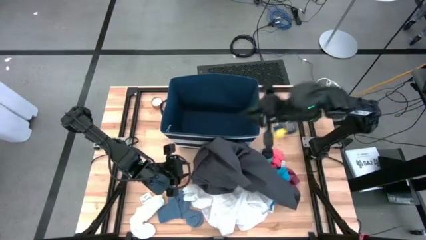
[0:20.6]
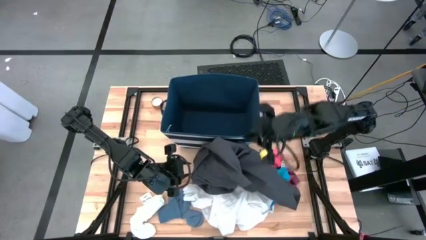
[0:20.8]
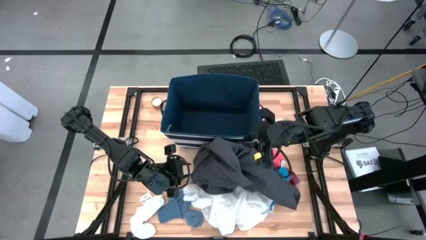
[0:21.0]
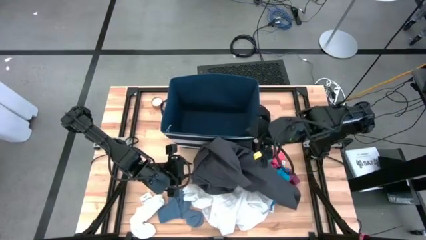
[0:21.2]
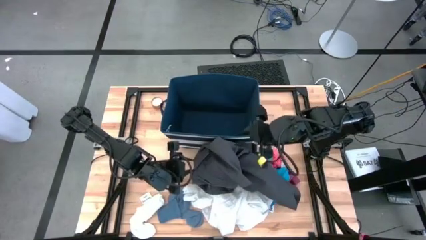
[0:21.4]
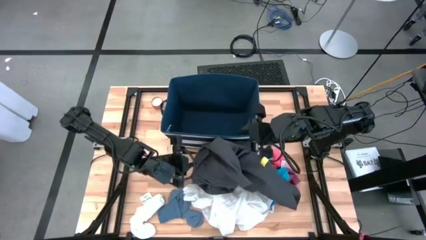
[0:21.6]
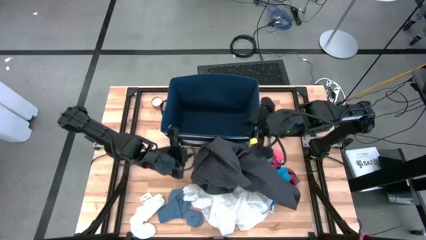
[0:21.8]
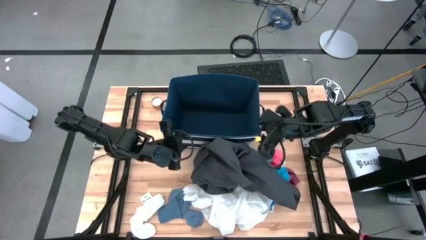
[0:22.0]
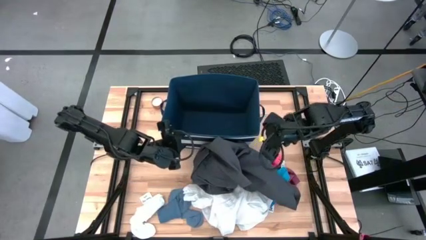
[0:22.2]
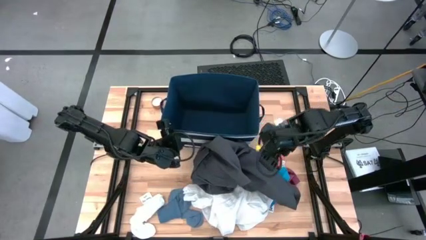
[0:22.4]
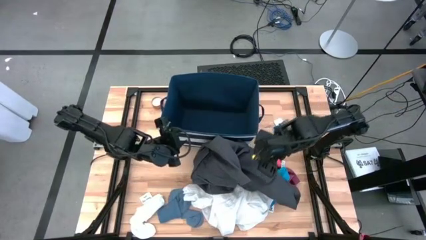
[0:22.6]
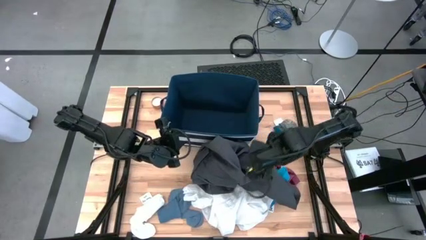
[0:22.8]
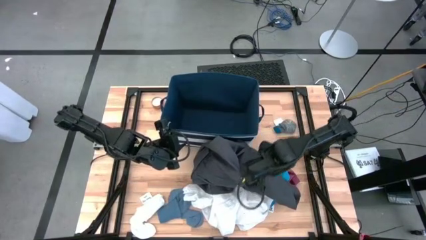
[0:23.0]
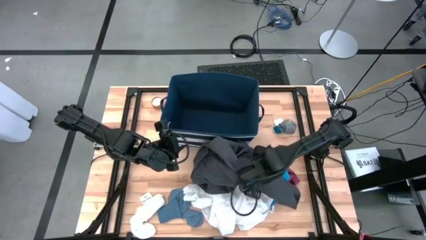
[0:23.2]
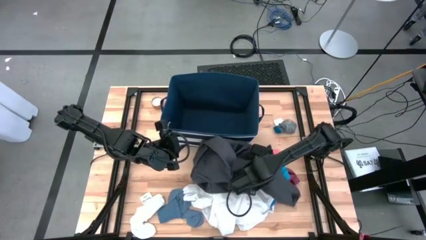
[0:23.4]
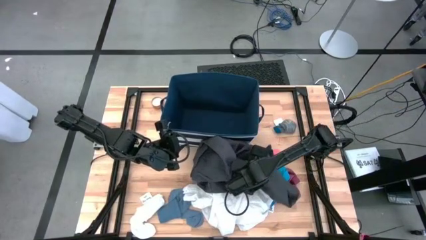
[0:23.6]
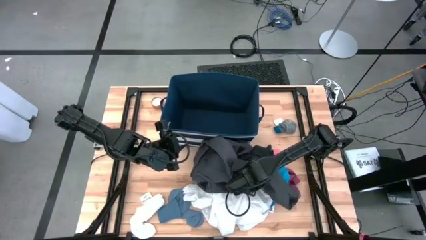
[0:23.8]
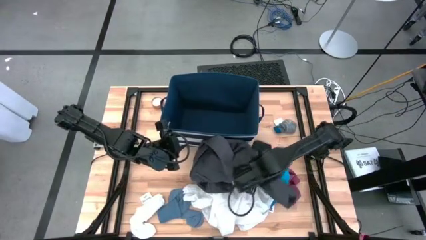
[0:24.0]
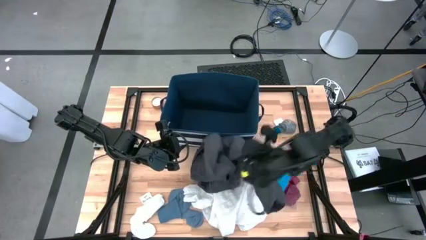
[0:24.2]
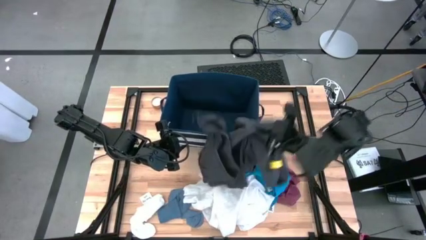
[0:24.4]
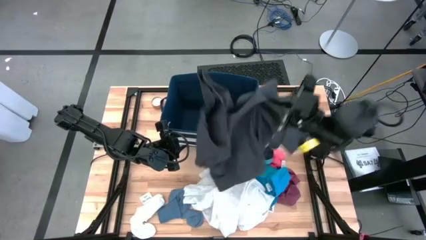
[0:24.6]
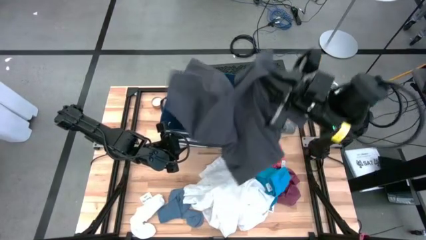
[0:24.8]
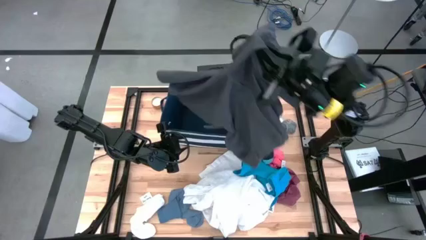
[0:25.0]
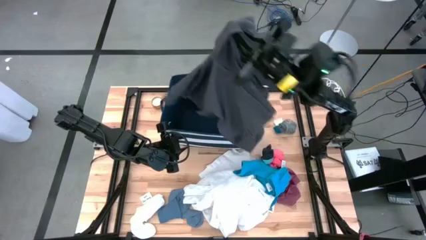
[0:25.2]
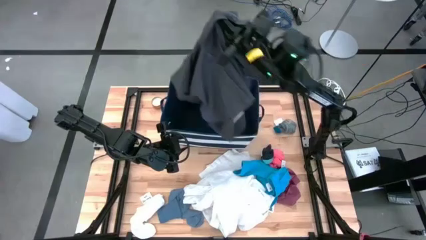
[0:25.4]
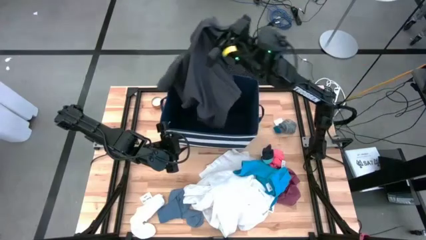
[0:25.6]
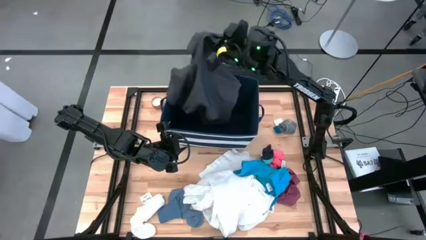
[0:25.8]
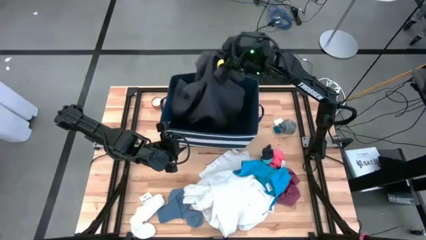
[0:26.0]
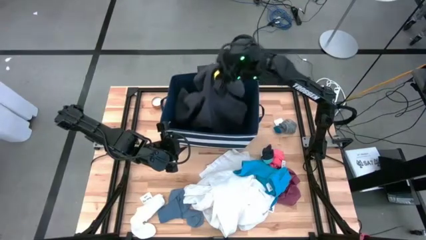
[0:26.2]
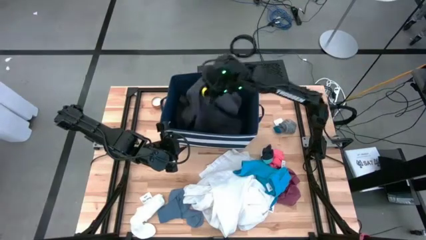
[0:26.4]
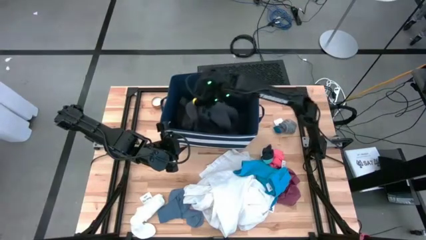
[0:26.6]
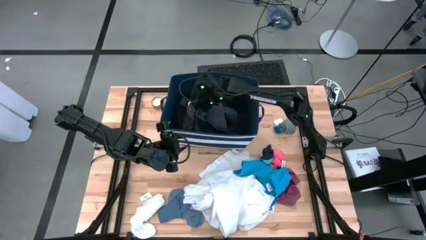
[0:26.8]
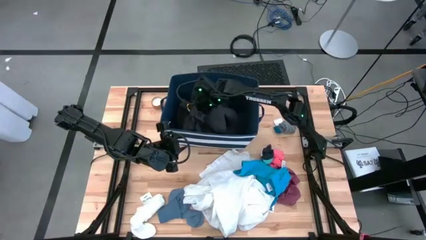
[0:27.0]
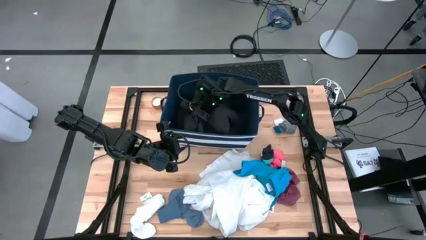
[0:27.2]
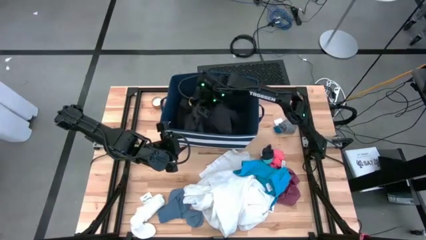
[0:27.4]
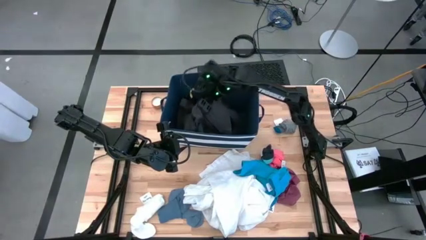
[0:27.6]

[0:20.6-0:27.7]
Task: Sort clothes
Put the gray short into the white and blue laundry organizer

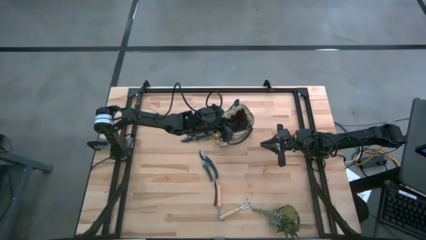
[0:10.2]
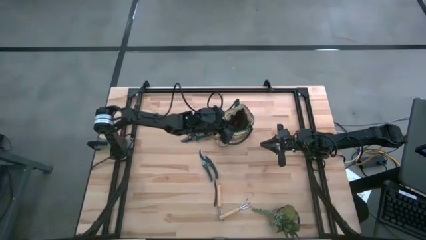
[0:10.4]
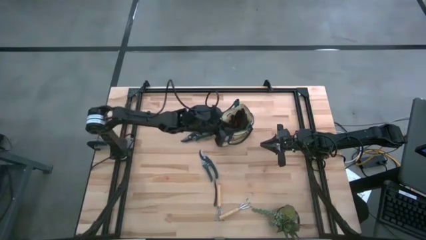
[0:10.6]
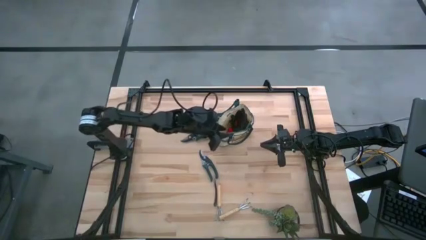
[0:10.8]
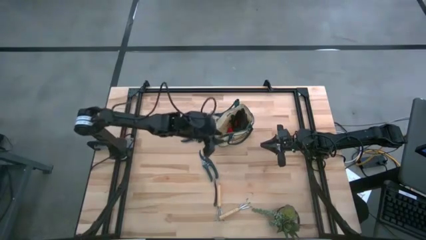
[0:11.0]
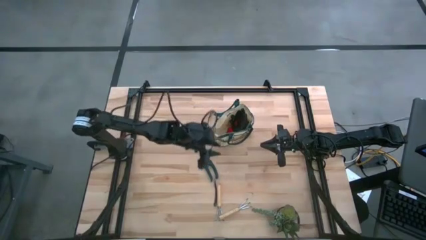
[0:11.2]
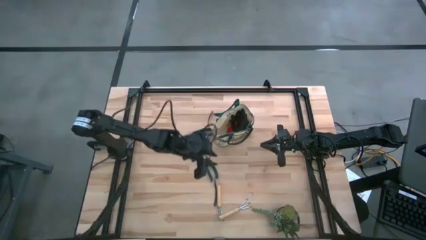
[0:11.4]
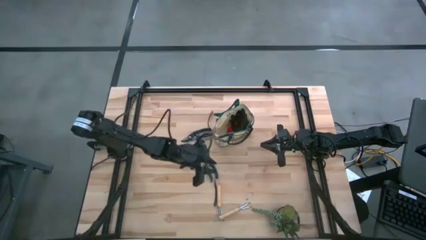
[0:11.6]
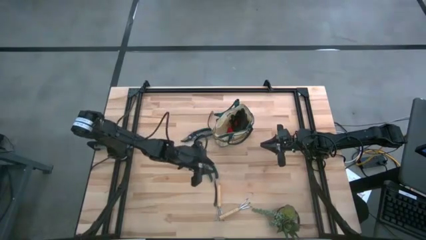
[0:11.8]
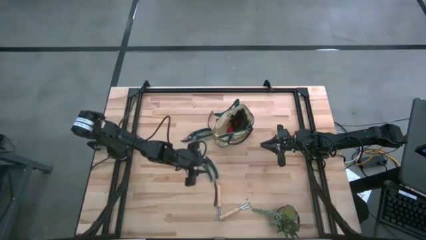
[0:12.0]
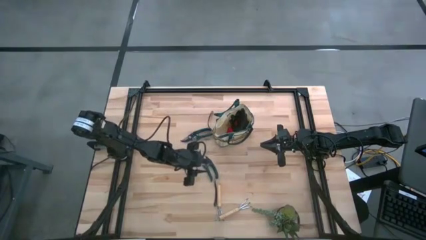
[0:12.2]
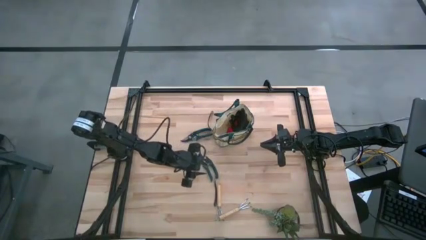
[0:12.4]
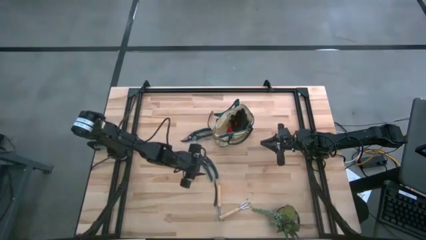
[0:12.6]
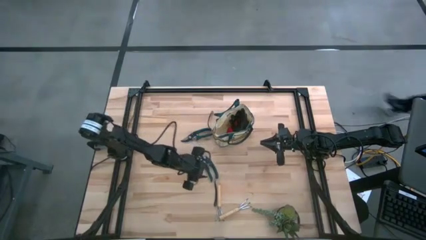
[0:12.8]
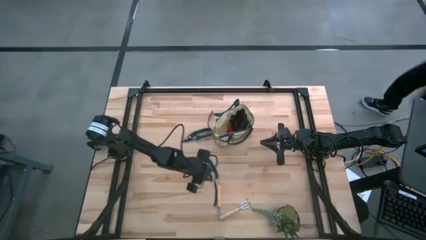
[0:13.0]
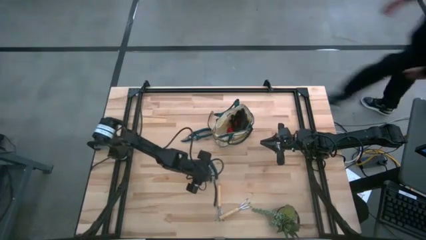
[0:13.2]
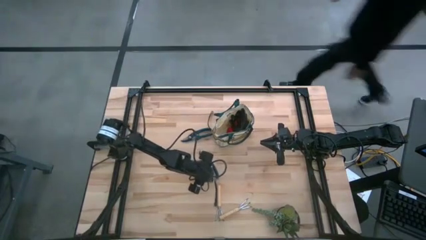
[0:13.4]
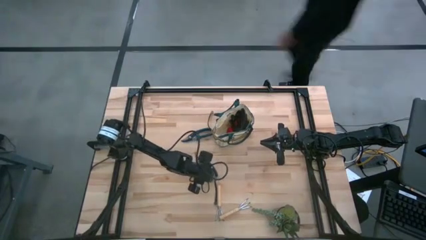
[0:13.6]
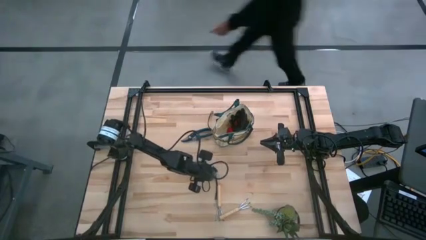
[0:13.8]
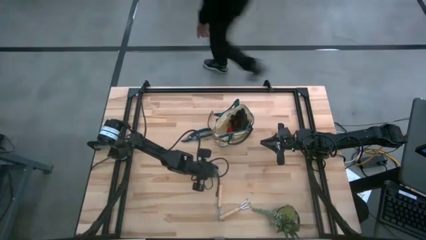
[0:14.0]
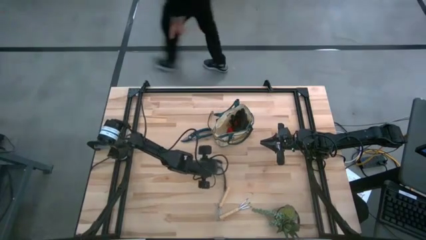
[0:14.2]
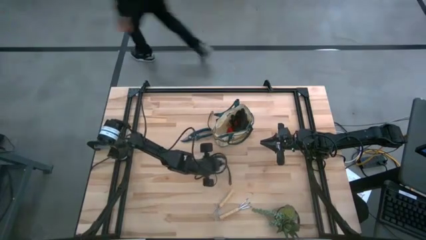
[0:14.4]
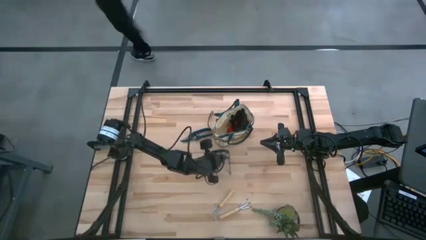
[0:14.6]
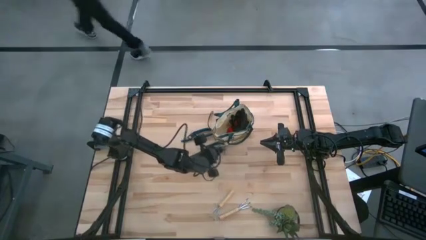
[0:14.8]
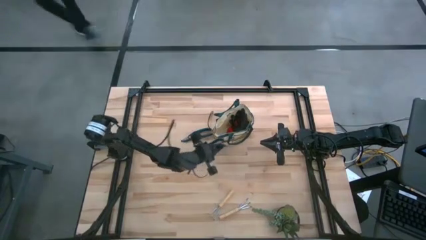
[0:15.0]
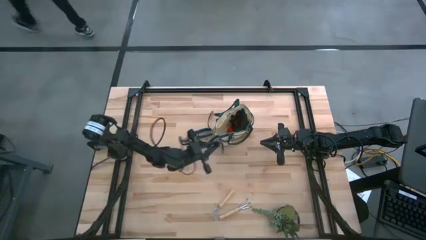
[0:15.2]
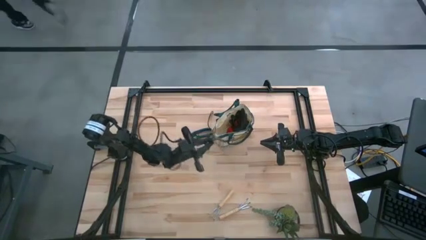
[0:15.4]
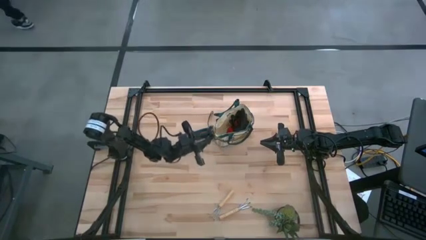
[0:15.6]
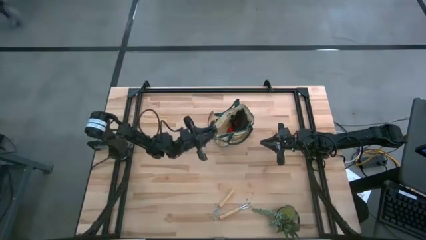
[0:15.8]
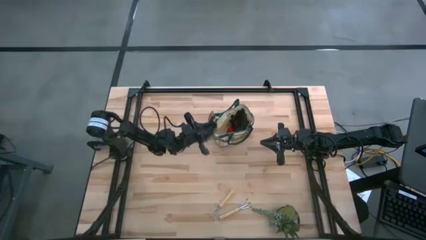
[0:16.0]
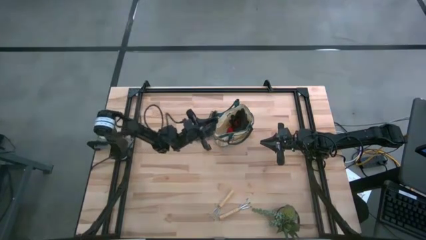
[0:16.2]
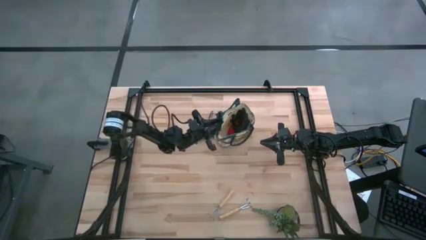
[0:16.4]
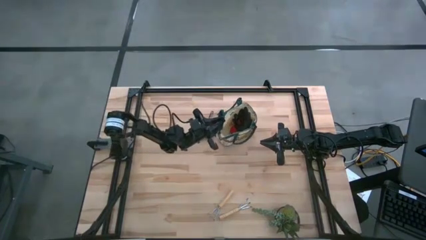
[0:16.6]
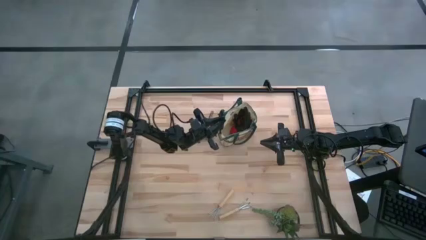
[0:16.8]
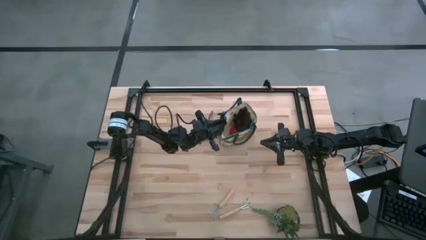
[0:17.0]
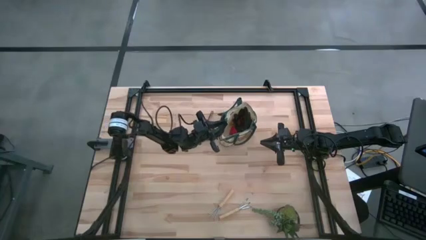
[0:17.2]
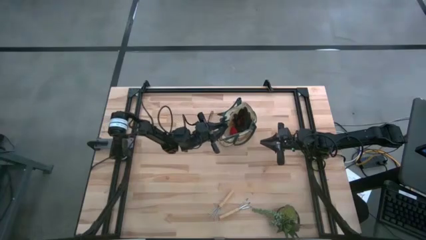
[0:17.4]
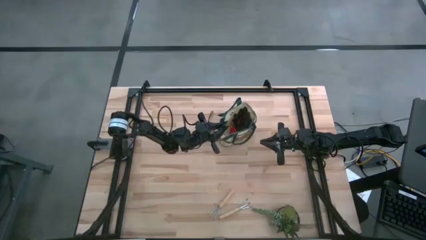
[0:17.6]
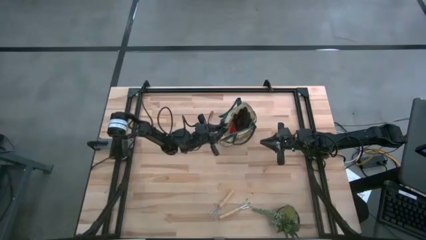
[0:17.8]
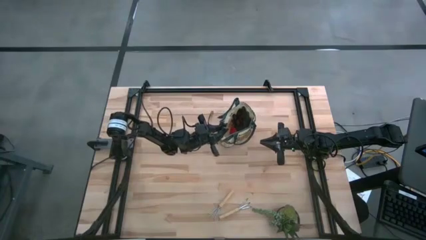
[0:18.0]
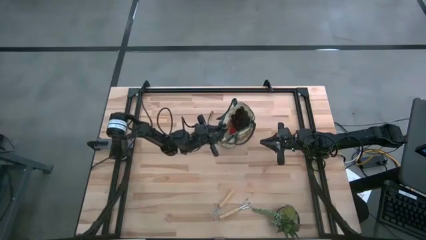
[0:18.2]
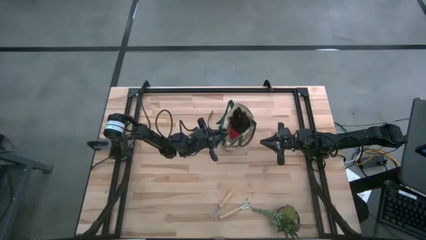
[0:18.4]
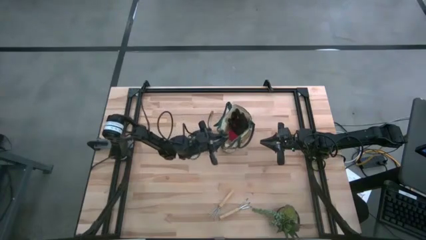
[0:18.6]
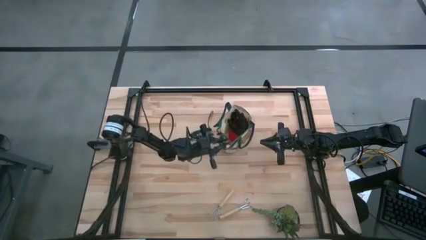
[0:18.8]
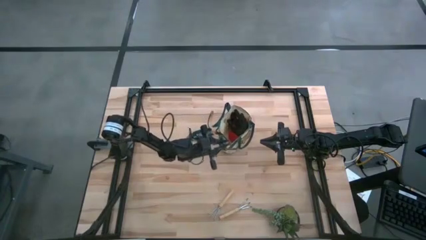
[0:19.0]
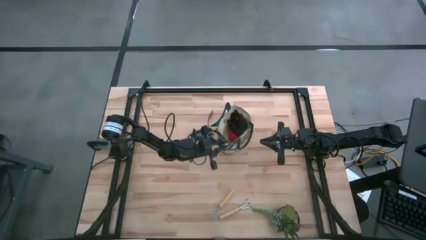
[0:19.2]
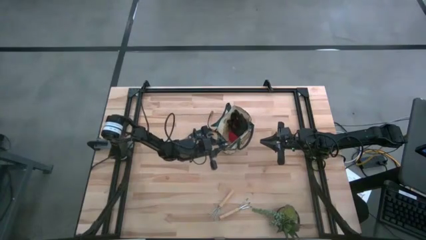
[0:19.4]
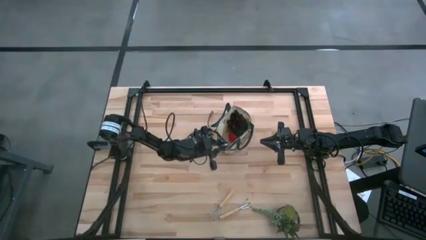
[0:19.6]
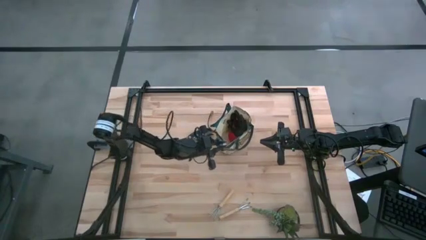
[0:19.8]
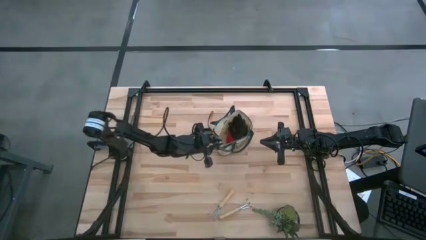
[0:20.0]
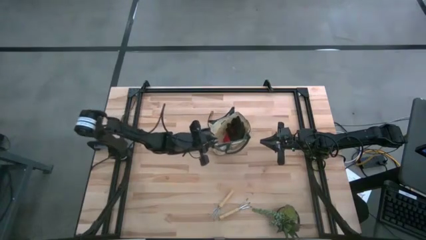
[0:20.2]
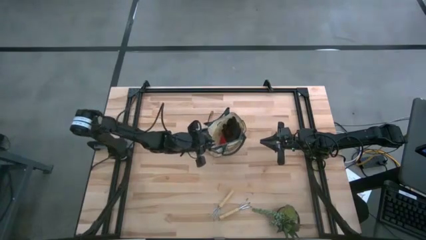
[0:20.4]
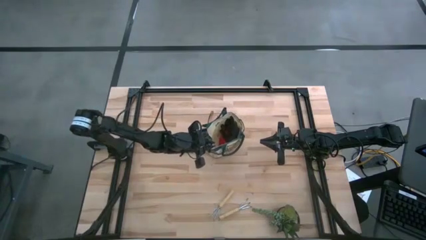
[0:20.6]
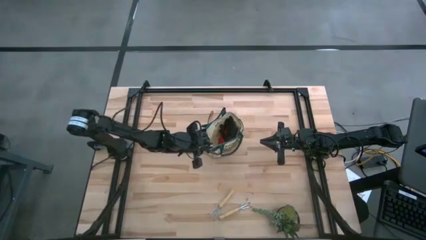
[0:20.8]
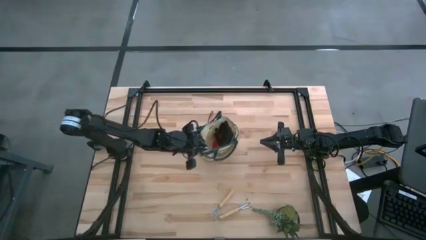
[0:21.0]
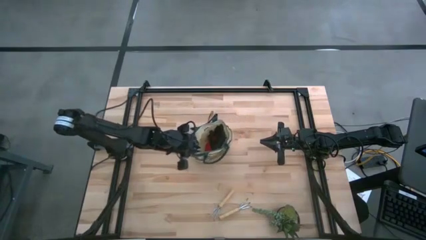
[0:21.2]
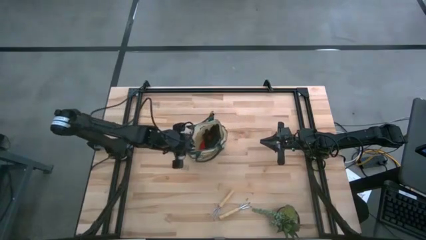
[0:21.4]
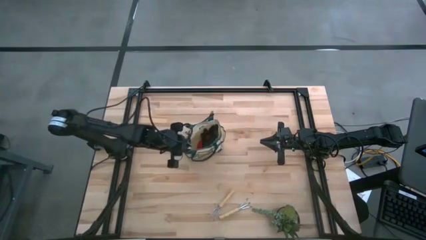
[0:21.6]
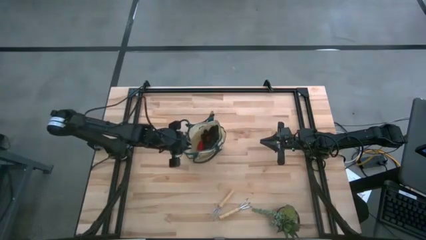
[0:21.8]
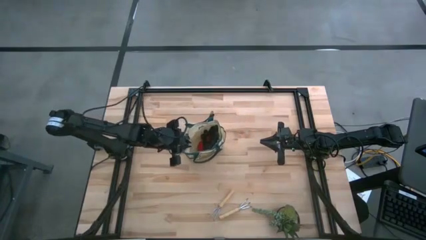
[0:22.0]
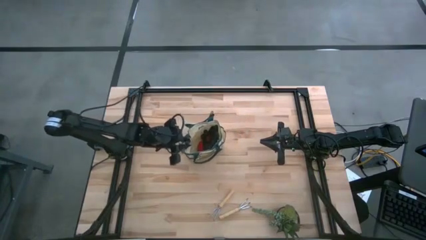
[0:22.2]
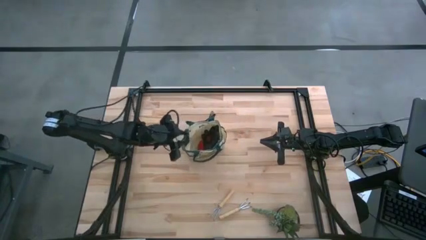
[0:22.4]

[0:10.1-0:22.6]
Task: Pick & Place Garden tools in Gardening bag
Put the green shear scissors into the gardening bag
